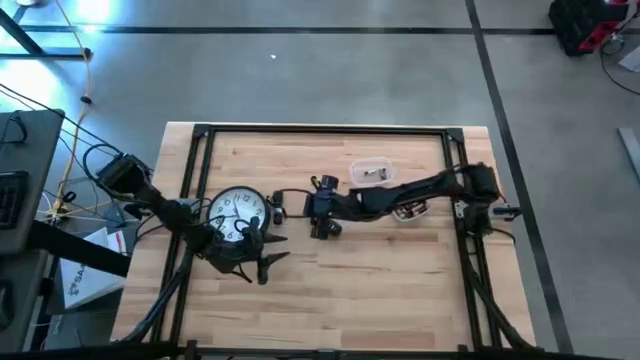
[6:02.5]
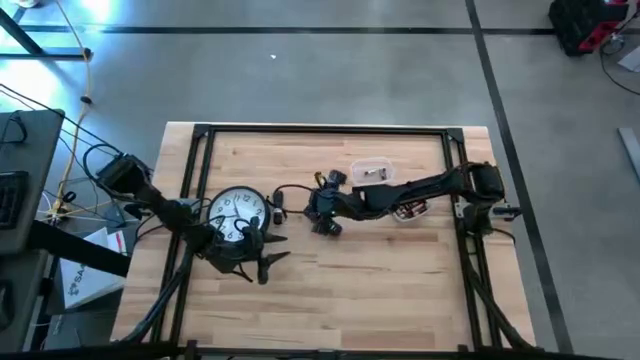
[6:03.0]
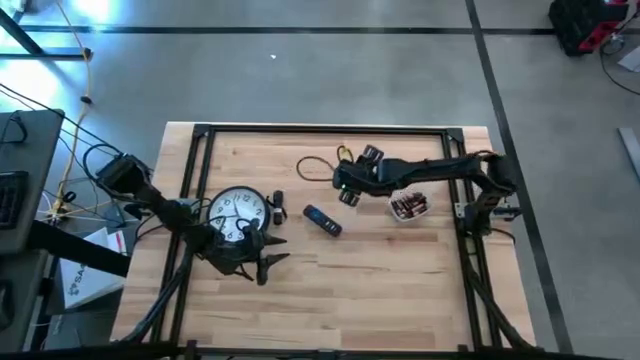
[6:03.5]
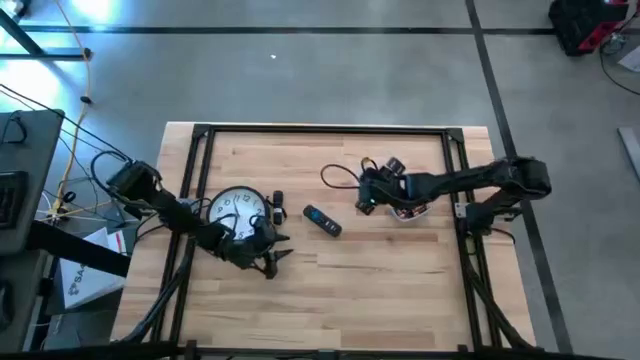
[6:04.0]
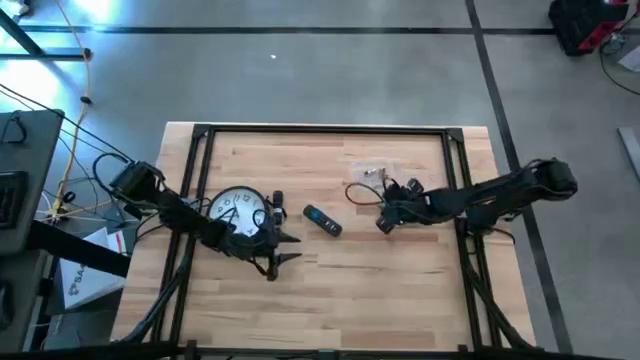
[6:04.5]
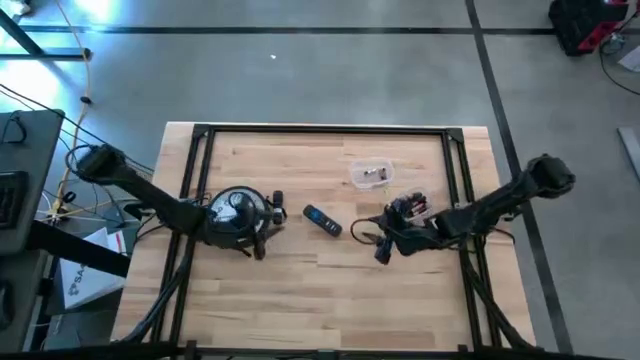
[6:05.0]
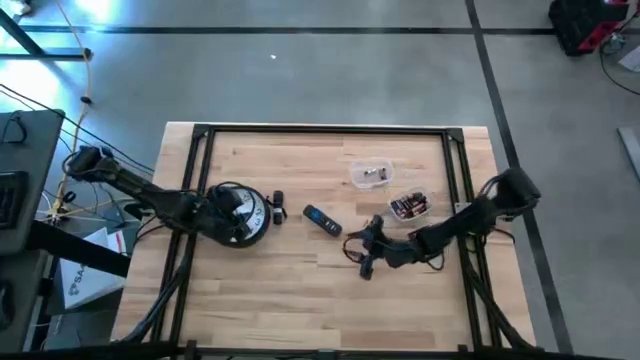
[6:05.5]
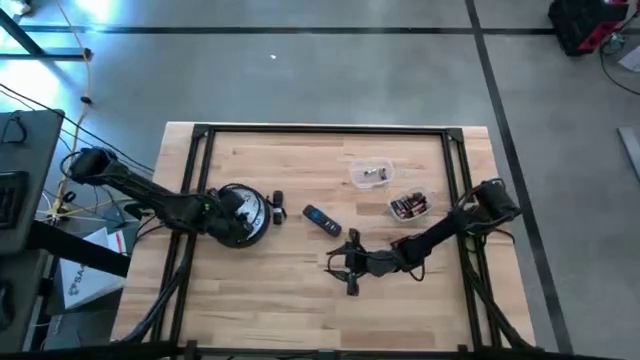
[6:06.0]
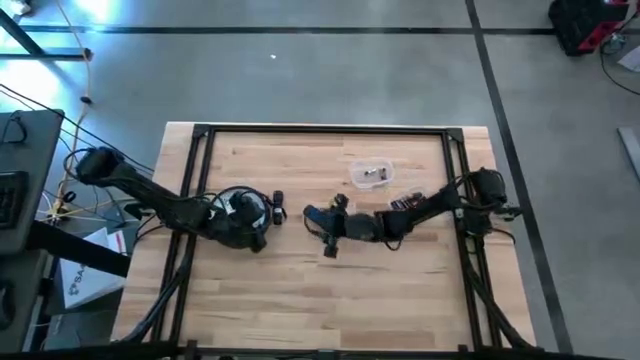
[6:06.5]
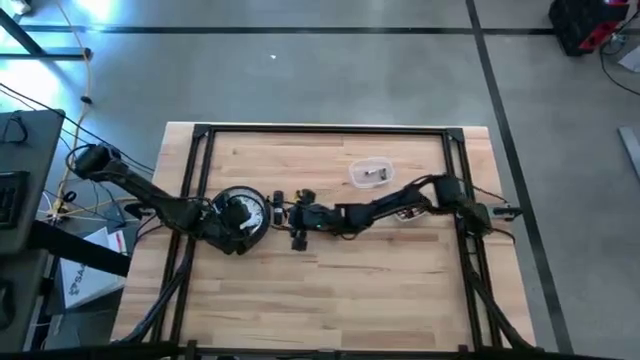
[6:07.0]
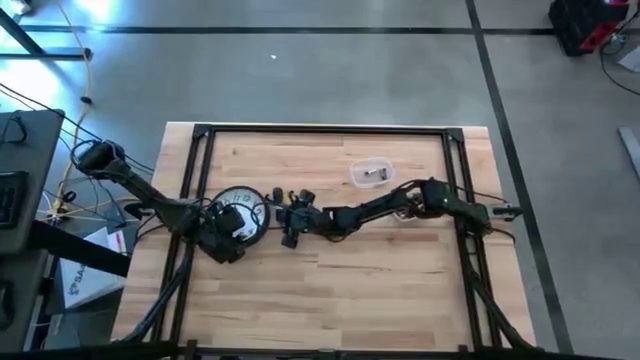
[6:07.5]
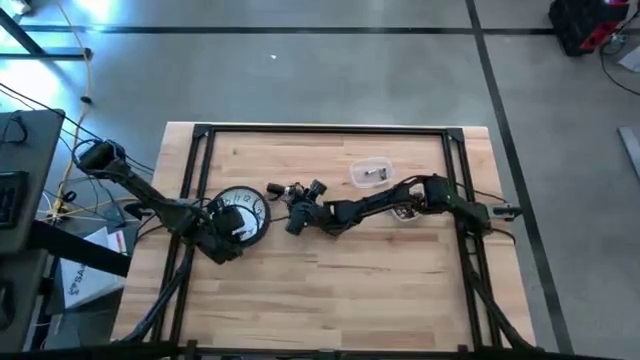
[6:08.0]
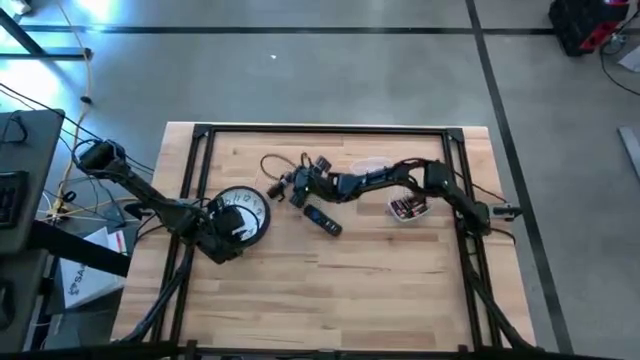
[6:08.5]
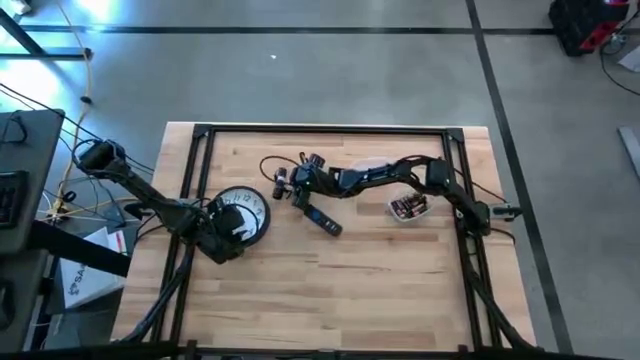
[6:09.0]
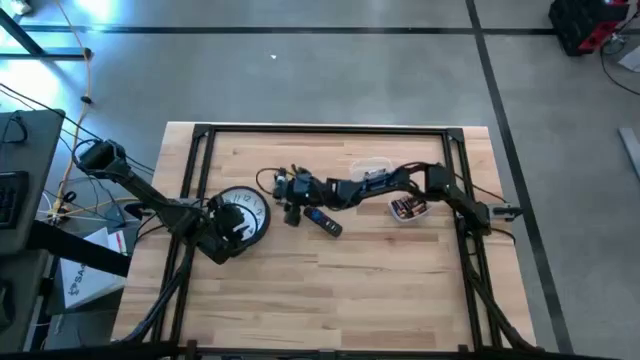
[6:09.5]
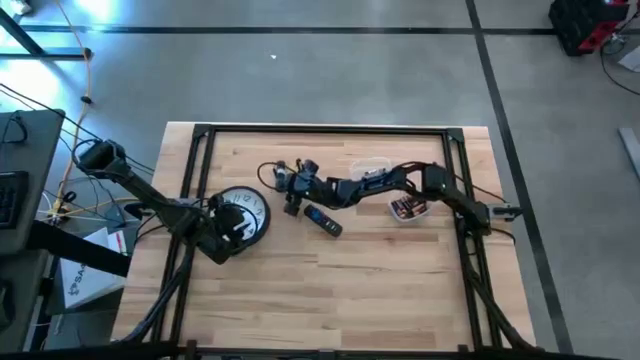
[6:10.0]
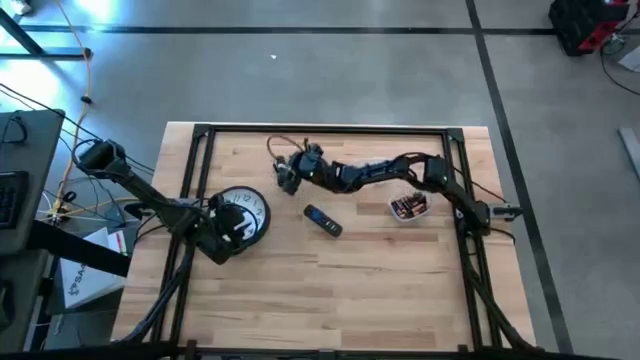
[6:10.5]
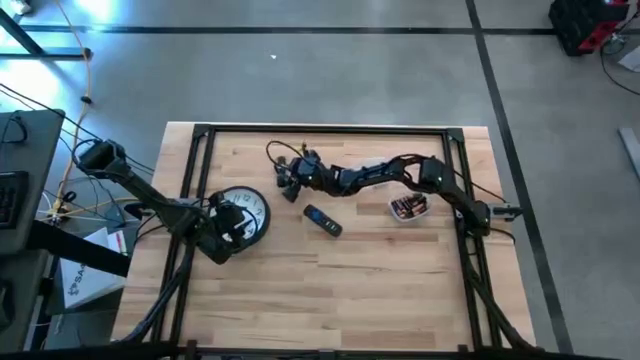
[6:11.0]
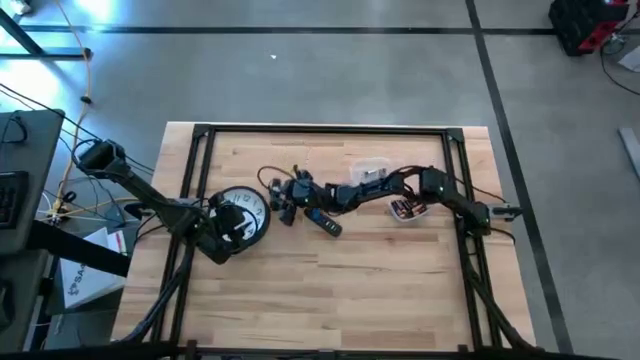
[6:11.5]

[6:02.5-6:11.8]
Task: Insert battery
Adjust the black flashlight beside the black remote control

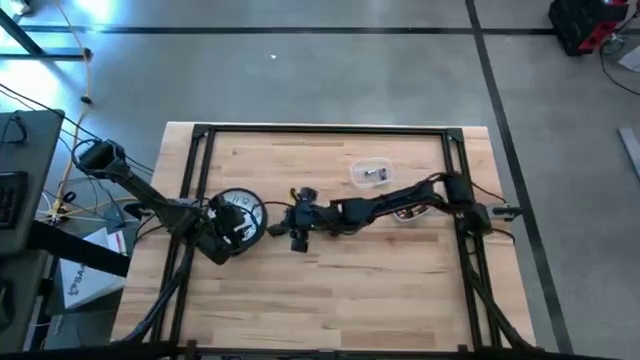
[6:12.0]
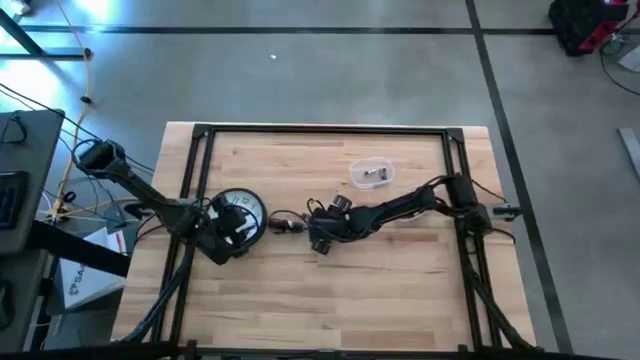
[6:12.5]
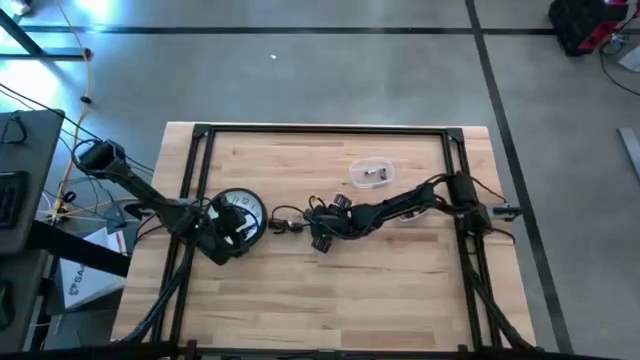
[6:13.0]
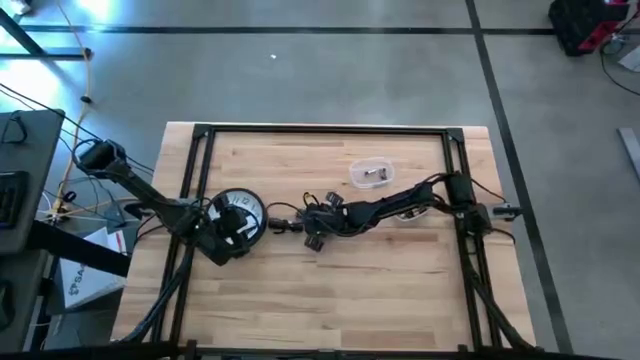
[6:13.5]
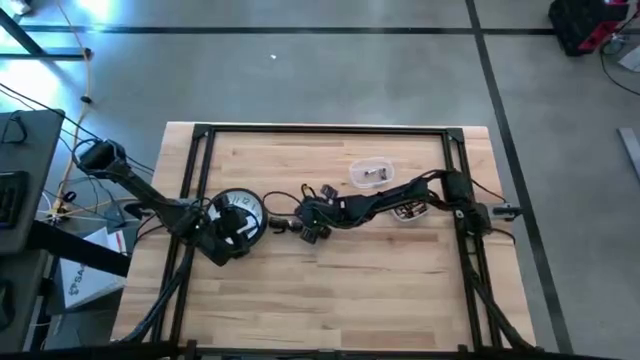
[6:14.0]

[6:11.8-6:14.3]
Adjust the black remote control beside the black flashlight

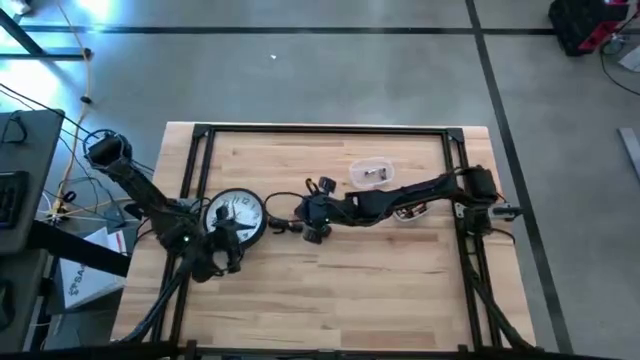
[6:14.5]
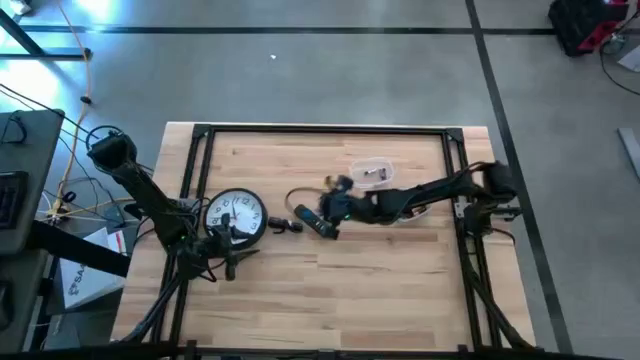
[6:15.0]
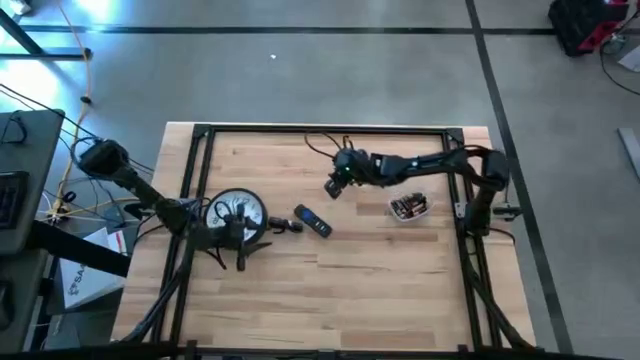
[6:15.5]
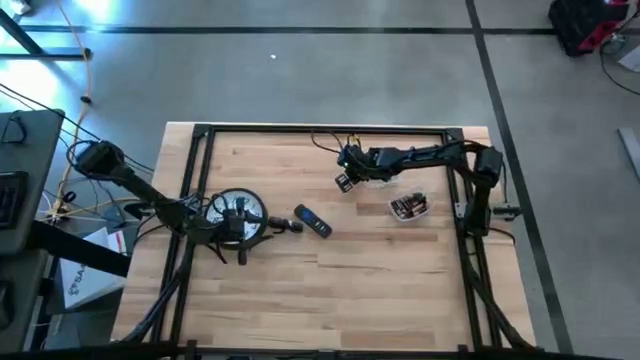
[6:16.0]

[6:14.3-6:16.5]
Adjust the transparent bin with the silver batteries

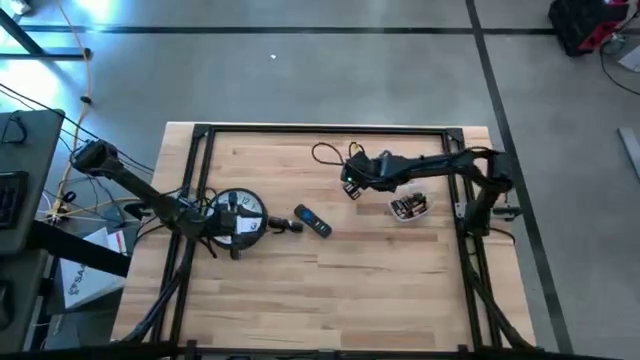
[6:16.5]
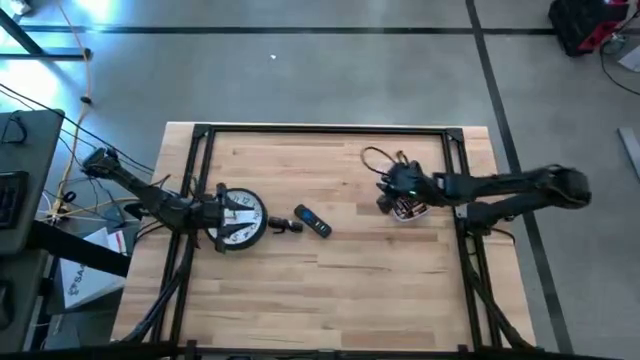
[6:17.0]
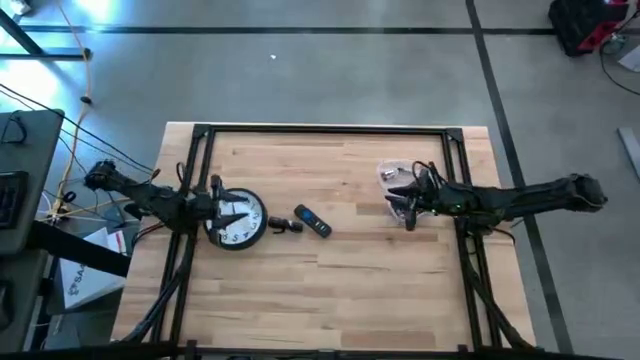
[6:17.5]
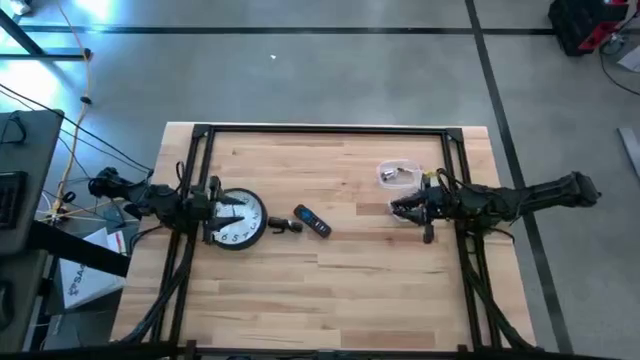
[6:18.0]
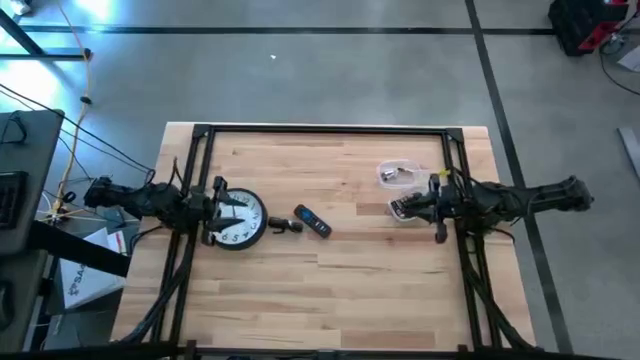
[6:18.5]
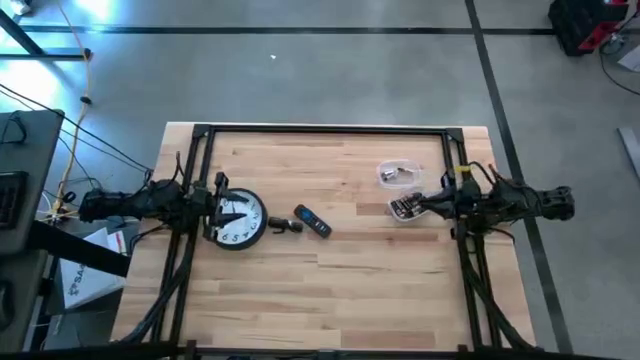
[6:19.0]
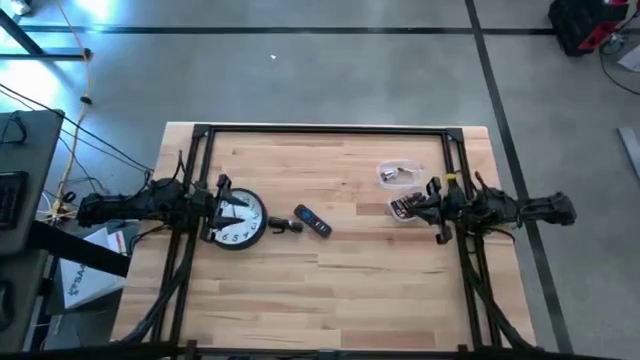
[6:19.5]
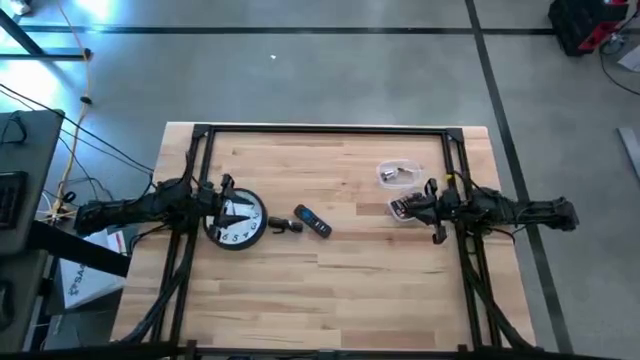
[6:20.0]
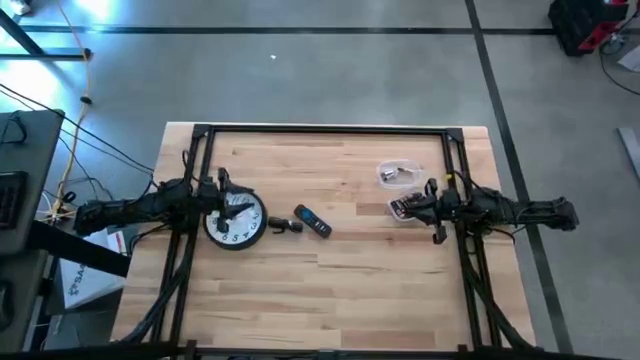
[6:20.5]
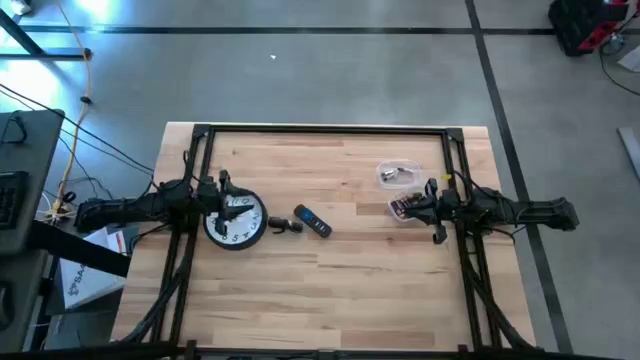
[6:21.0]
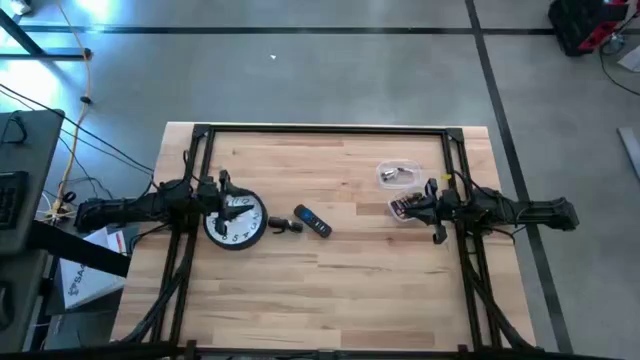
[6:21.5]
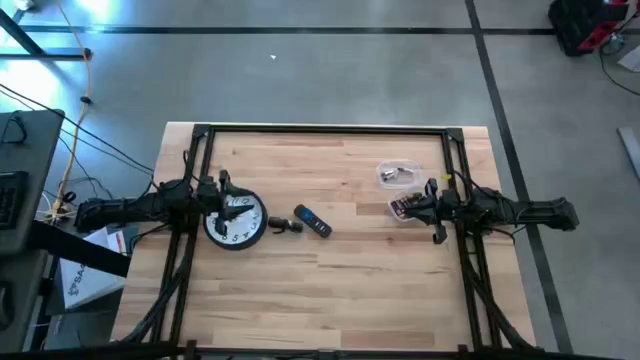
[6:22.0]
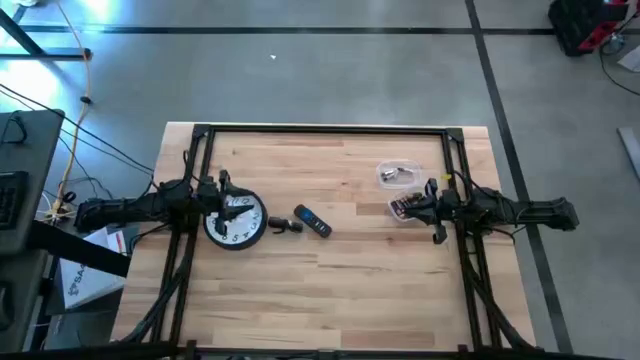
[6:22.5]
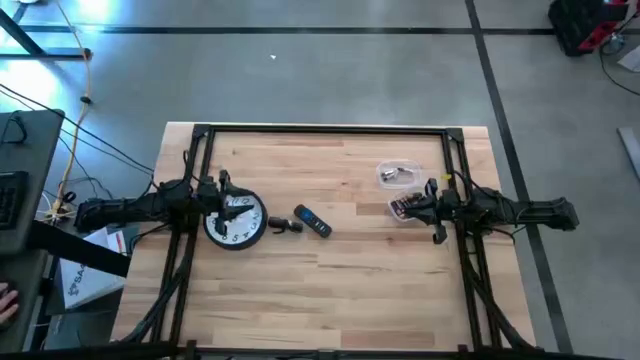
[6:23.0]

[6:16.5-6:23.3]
Return to home position
